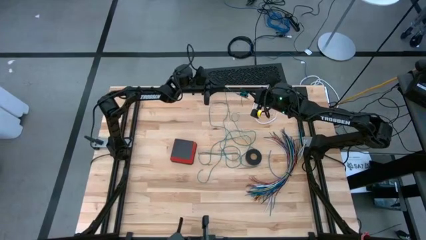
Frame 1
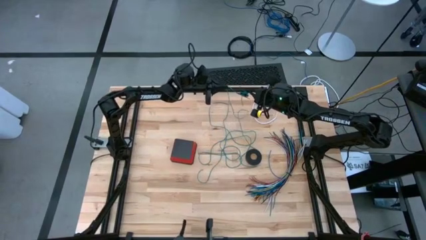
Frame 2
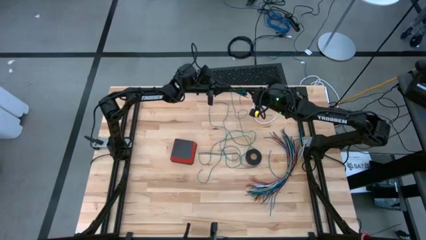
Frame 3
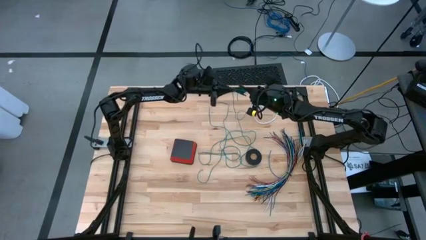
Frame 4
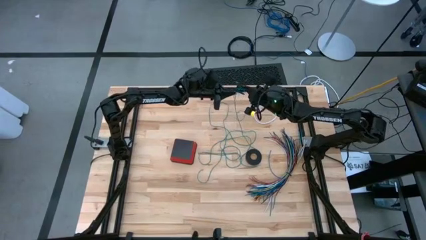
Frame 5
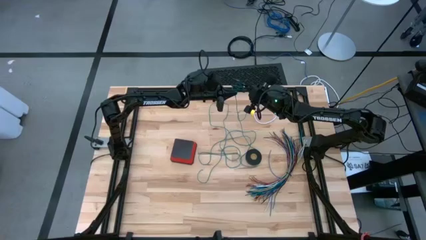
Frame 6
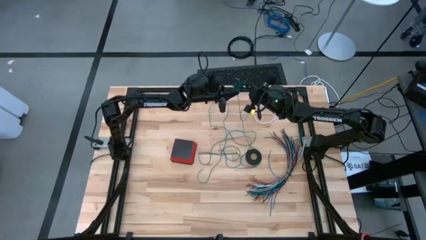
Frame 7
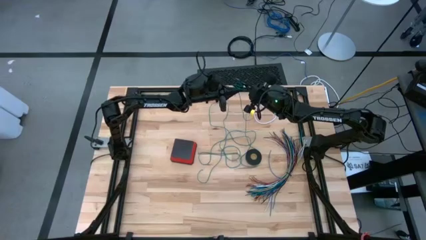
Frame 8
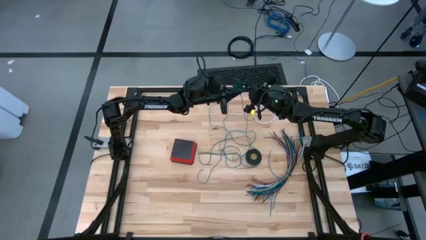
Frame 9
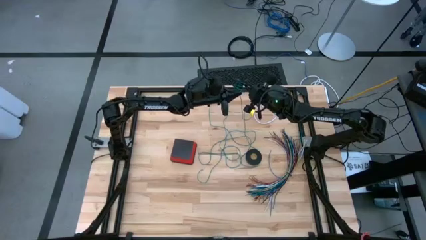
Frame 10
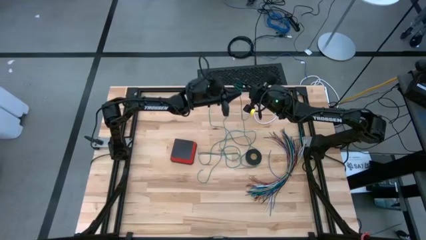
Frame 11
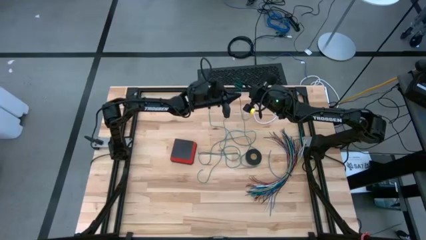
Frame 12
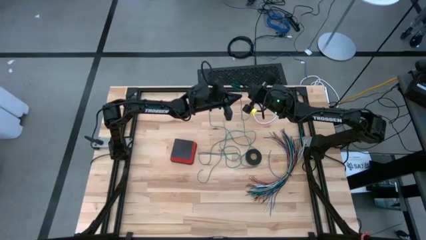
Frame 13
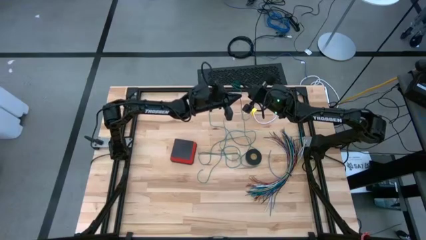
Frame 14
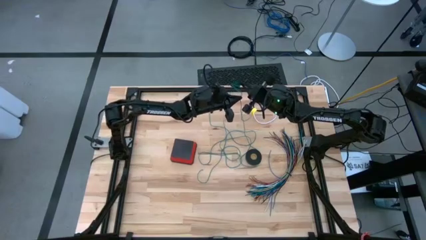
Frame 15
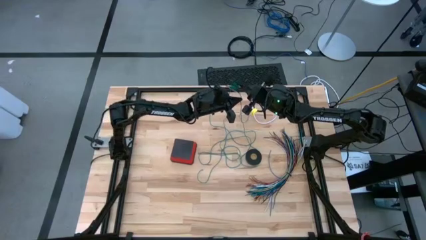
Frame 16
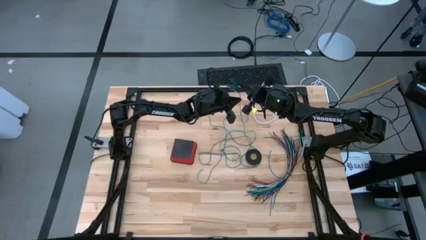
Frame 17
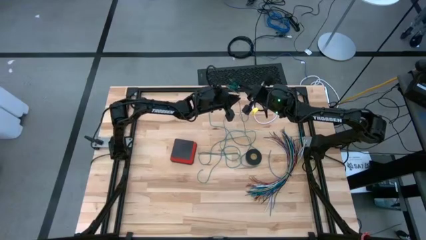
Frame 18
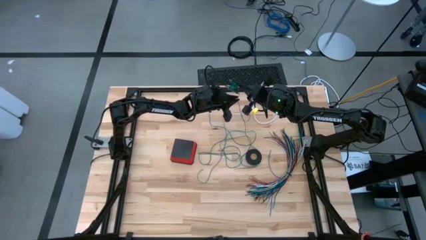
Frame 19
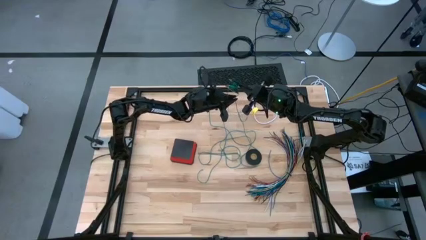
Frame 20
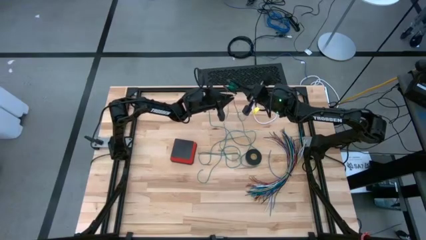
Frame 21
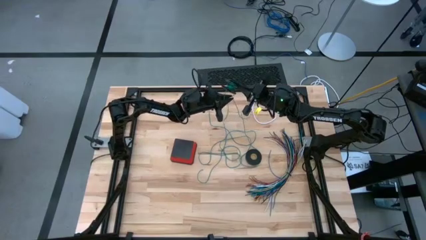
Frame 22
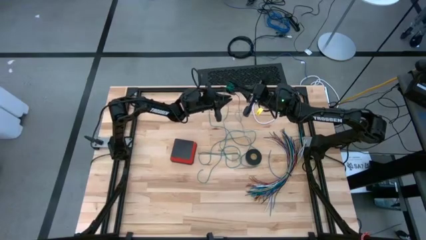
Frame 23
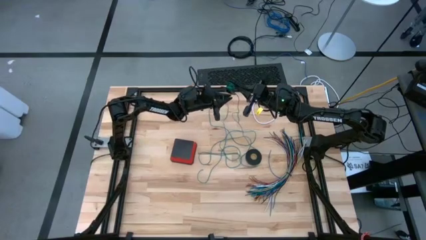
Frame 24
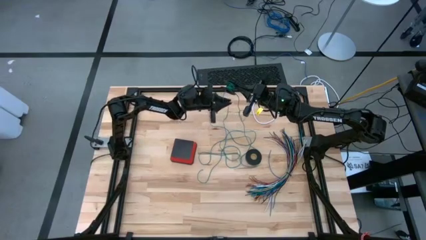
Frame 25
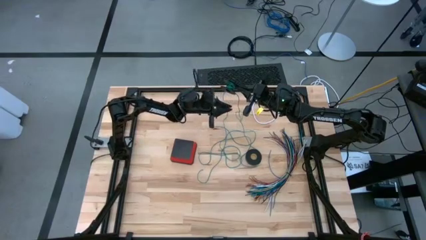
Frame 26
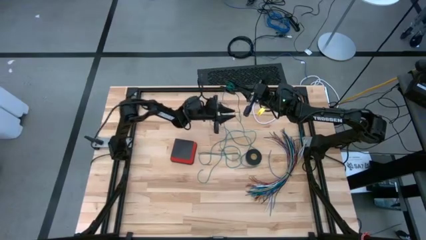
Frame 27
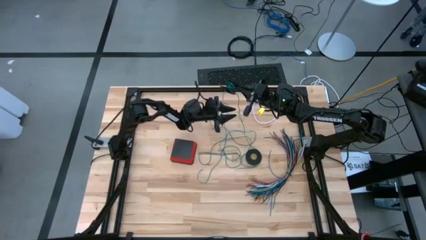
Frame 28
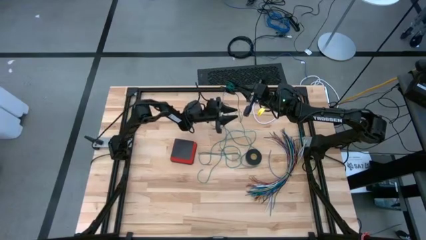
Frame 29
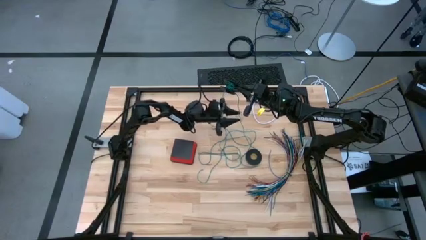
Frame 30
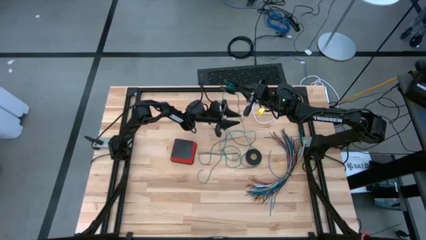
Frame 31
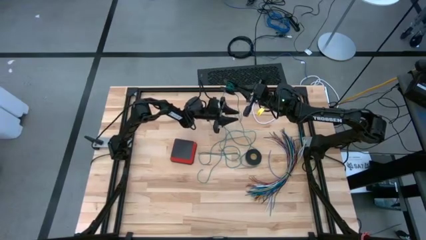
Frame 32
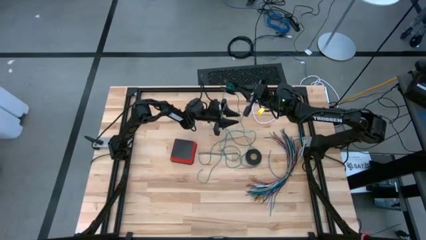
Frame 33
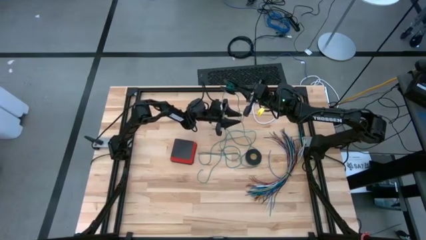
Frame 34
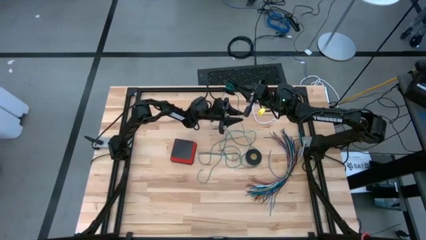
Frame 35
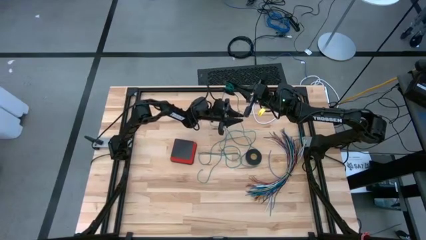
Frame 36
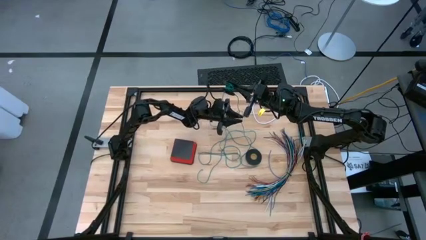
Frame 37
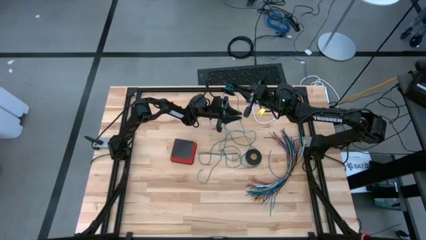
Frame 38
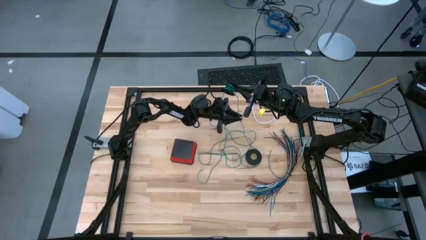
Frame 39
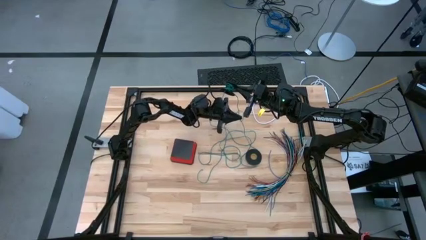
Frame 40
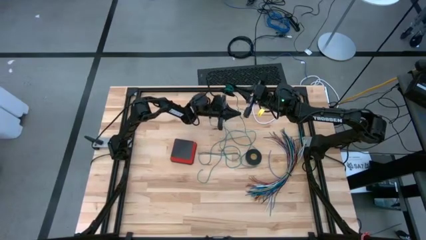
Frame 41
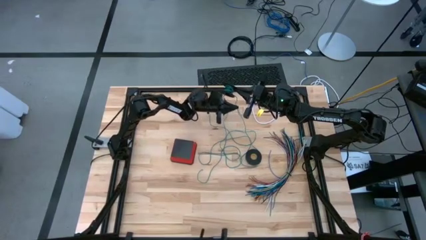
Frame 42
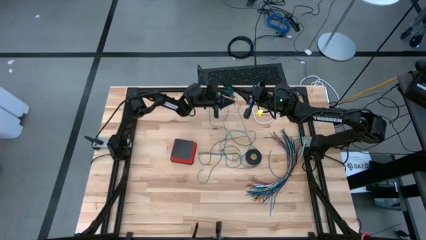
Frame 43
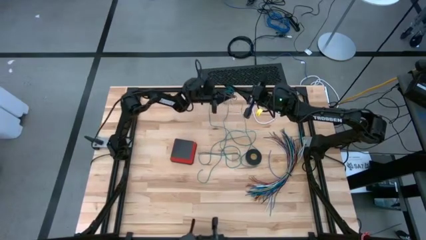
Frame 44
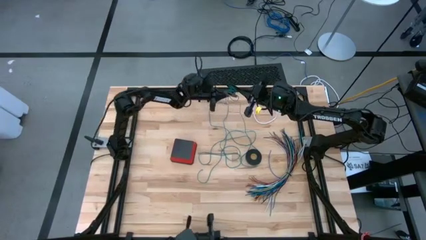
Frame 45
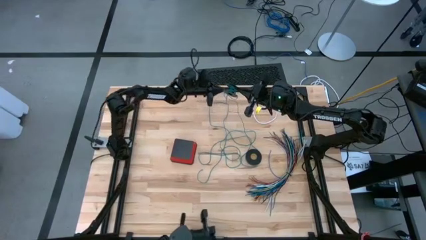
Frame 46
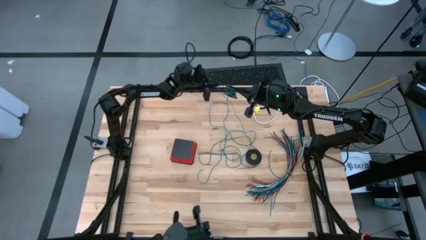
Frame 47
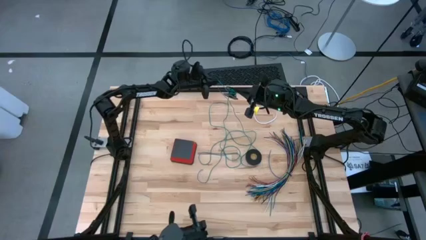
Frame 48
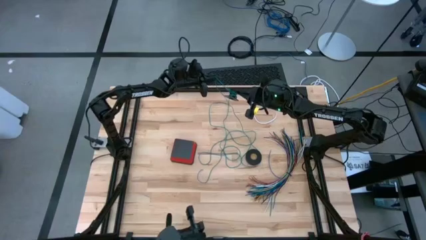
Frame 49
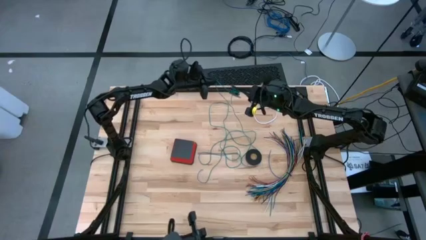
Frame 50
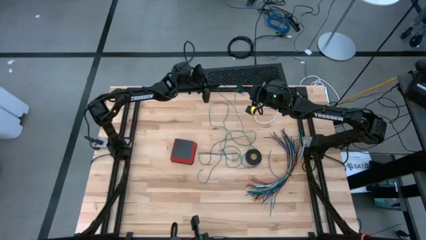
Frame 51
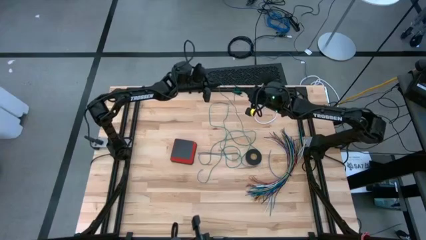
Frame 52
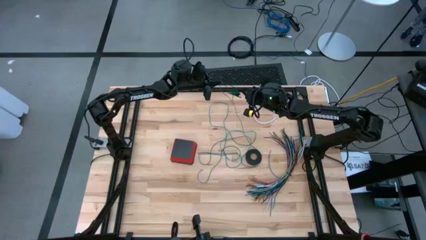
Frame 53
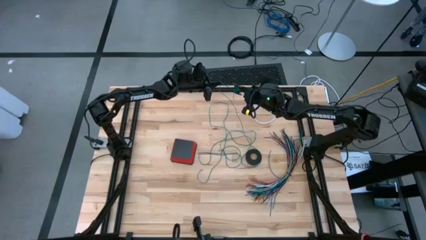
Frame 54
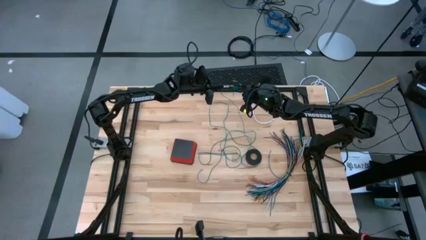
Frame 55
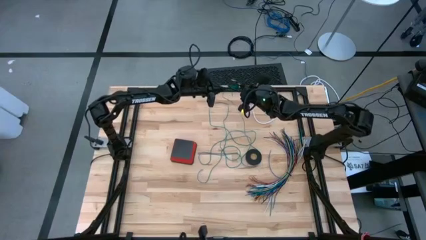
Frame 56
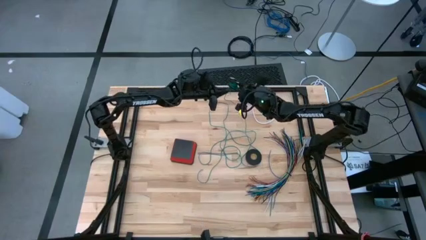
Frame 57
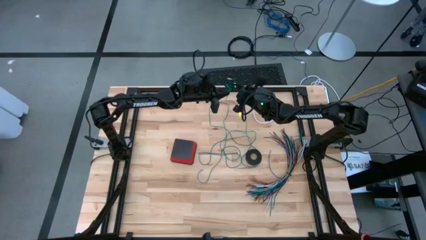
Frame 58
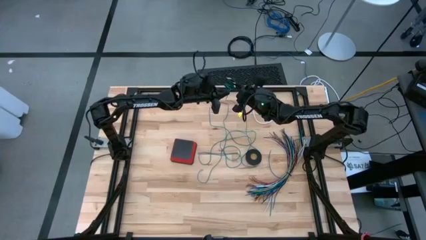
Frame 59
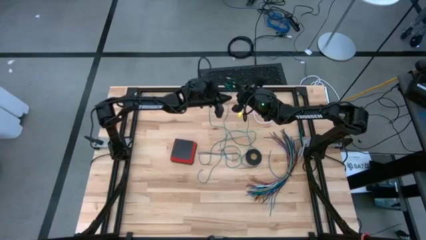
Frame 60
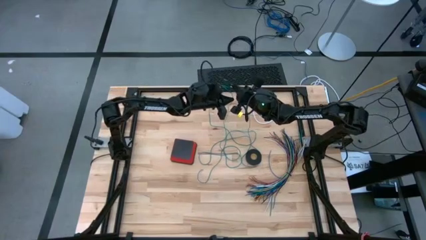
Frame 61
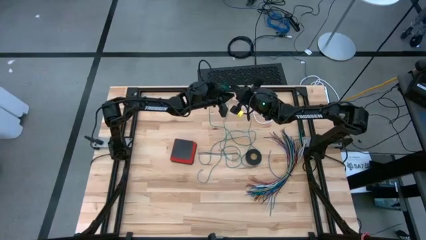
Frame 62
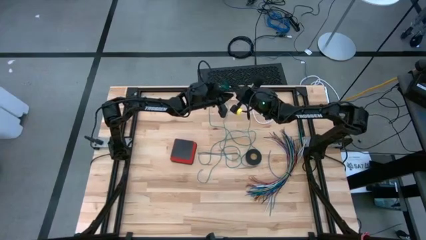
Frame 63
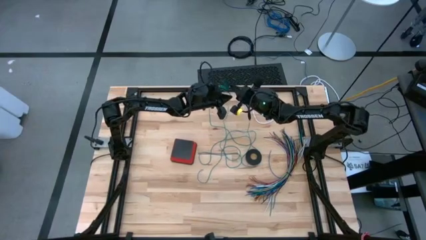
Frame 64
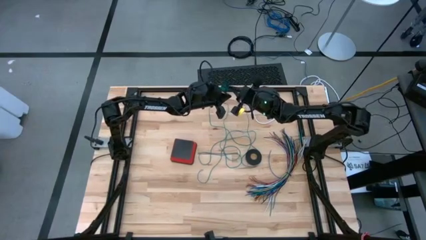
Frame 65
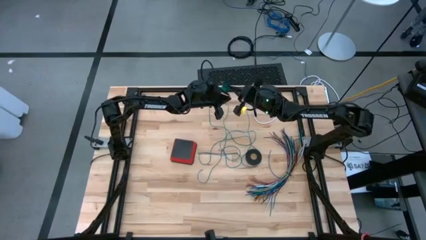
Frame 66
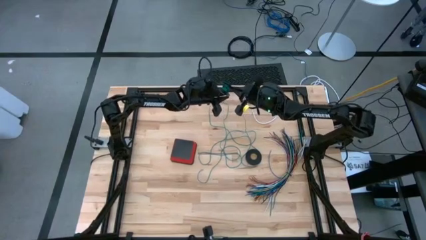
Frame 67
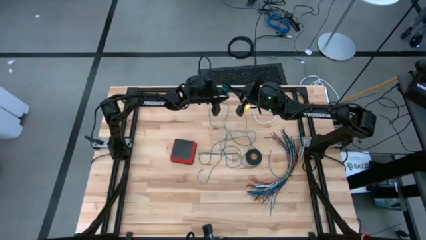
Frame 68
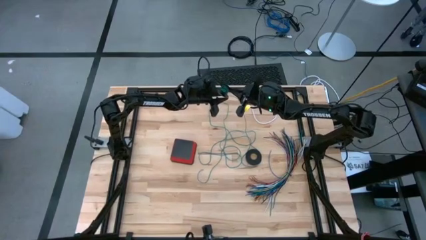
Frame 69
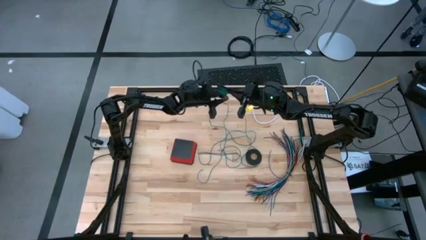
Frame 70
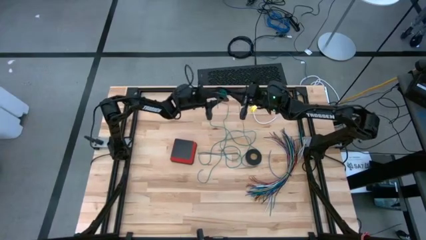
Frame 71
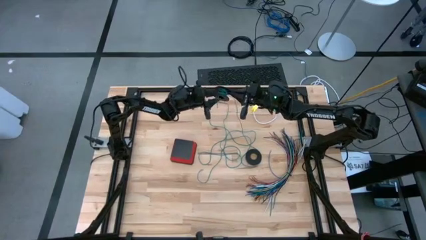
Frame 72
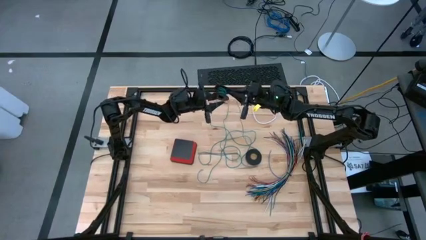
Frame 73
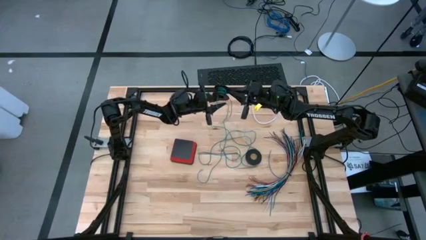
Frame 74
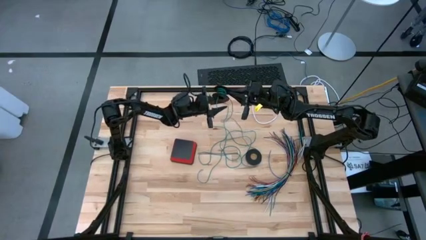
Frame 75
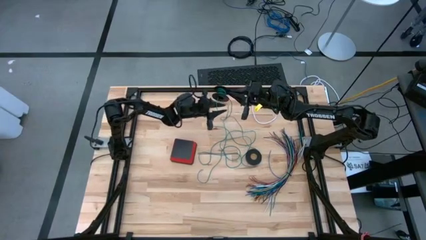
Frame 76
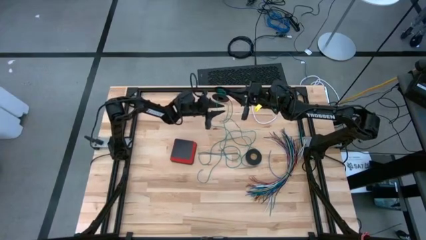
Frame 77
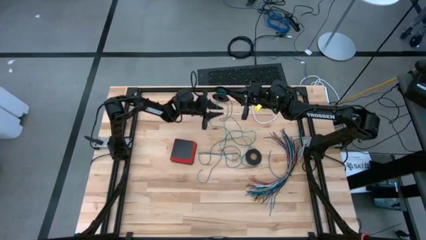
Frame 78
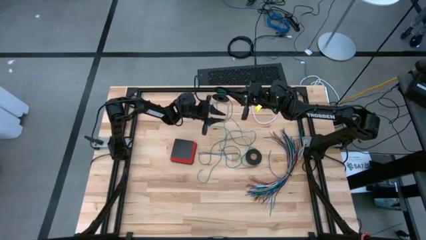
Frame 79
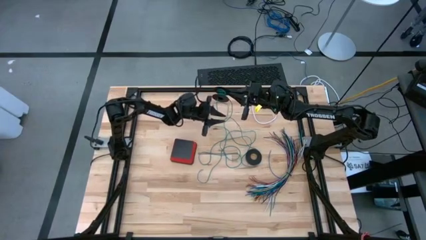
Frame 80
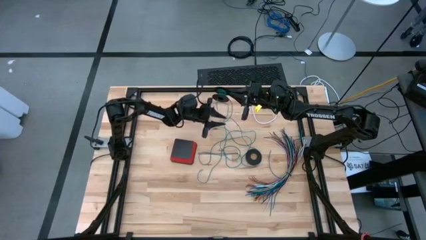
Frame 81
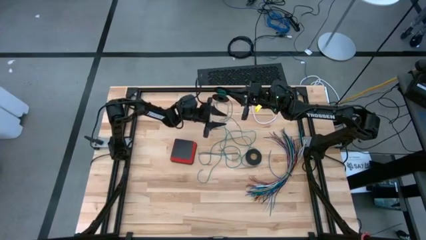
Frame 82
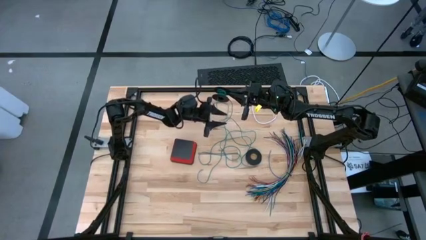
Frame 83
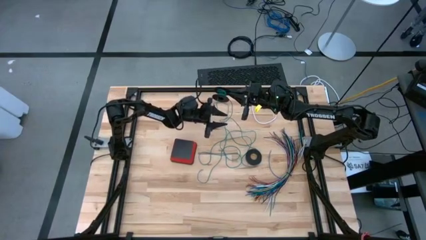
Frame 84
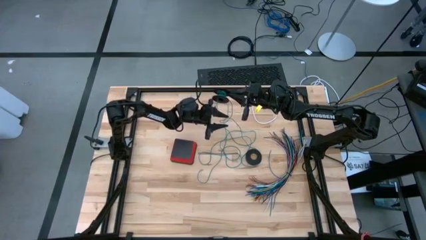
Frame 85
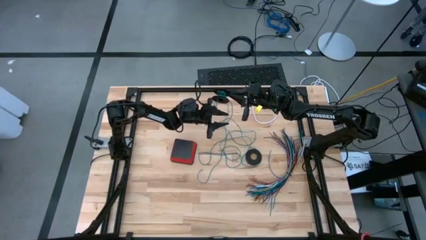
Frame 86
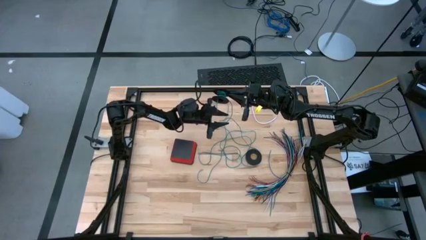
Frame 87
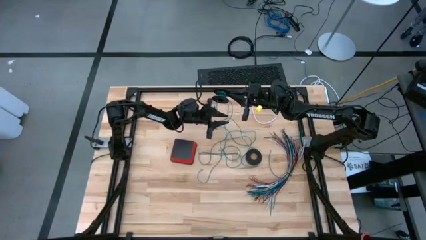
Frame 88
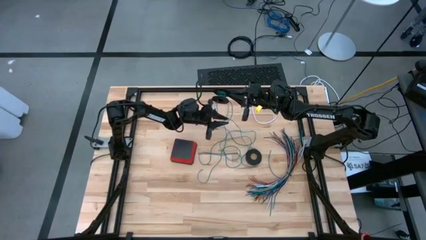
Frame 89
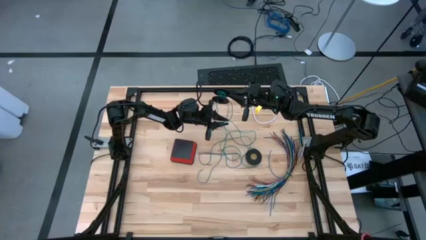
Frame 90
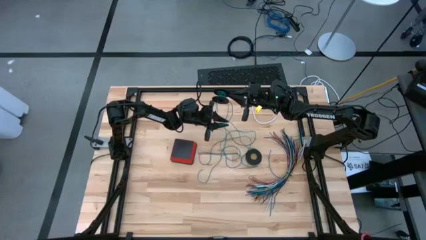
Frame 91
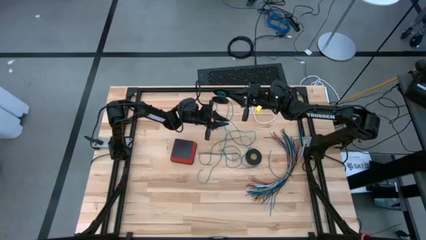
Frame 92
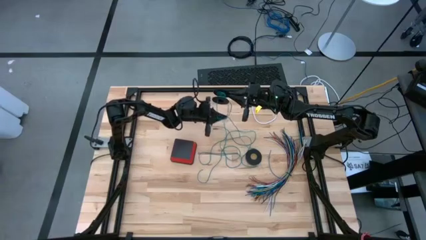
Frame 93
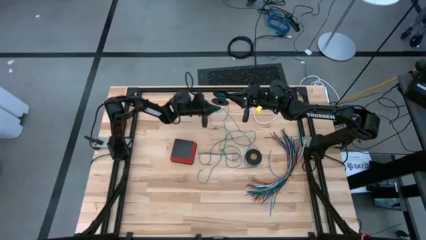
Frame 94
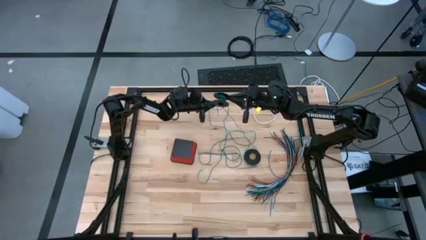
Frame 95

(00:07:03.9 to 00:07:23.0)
Task: Coiling cords
Coil the green wire cable on the spool
